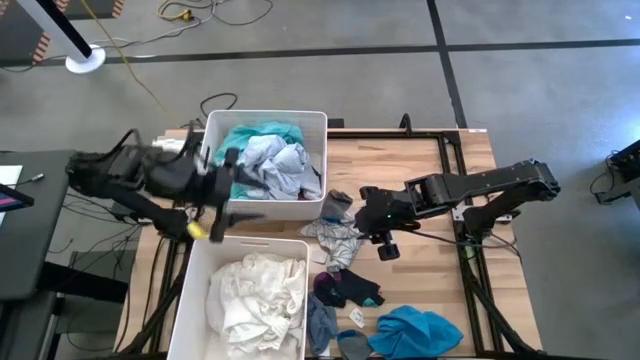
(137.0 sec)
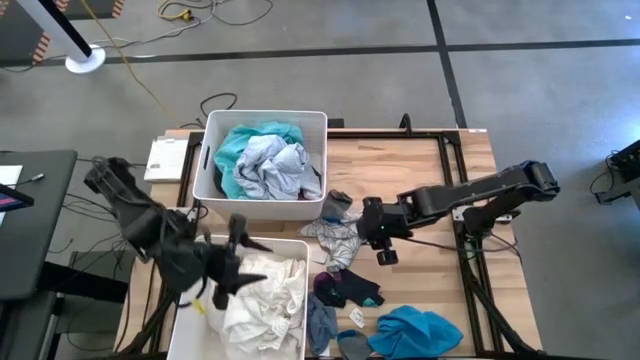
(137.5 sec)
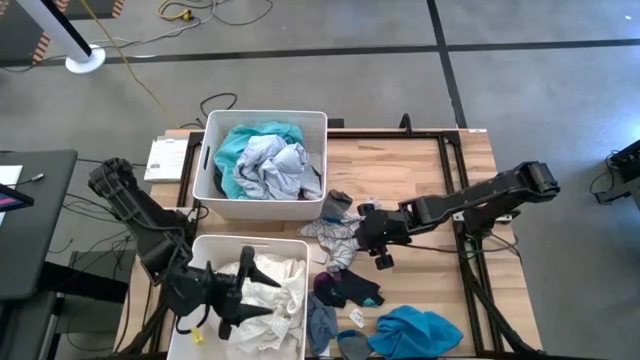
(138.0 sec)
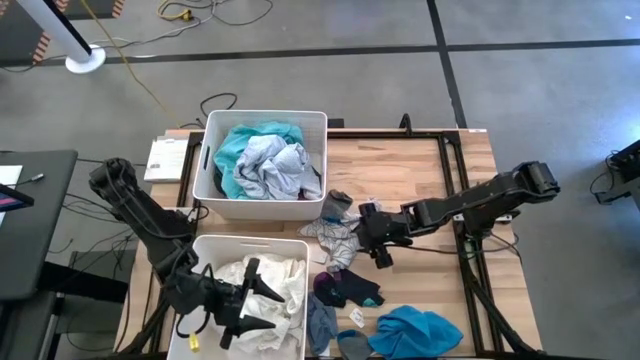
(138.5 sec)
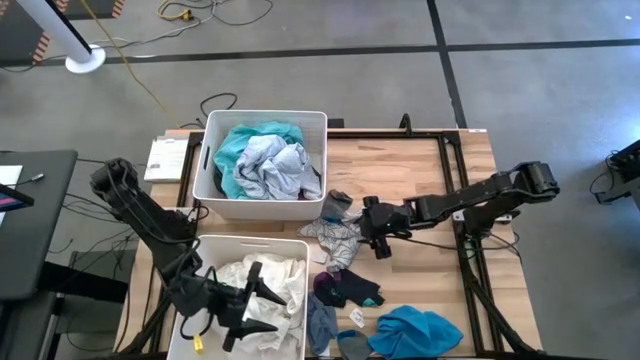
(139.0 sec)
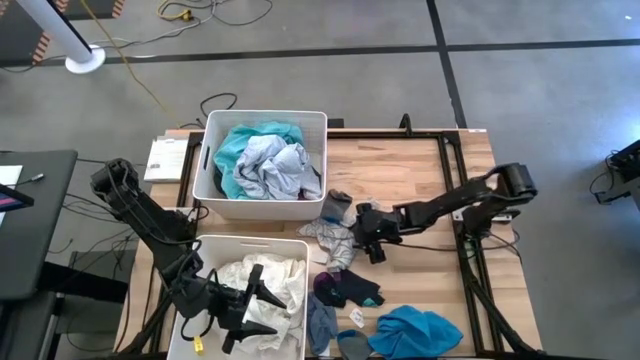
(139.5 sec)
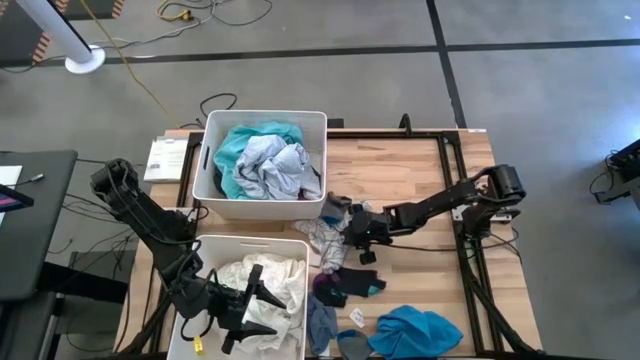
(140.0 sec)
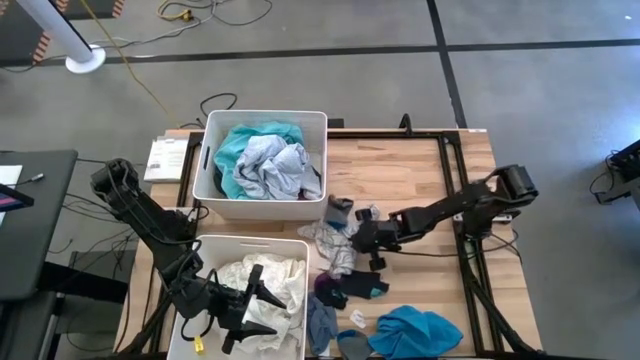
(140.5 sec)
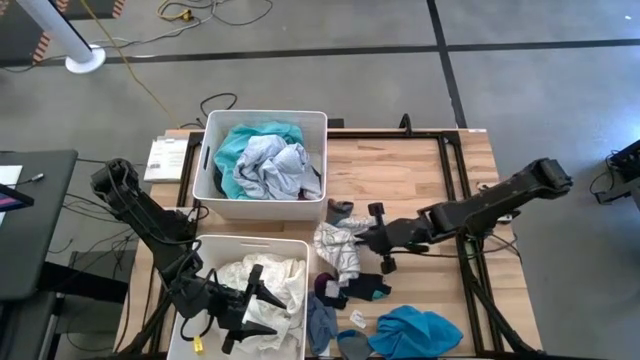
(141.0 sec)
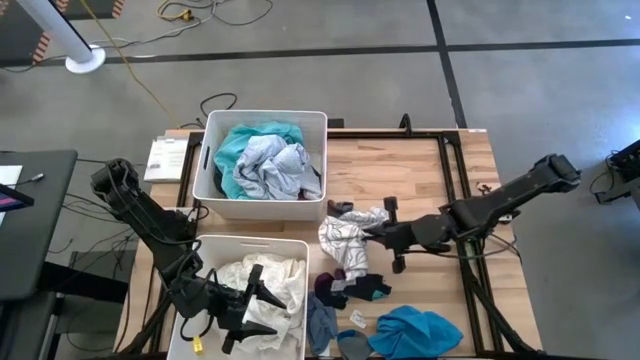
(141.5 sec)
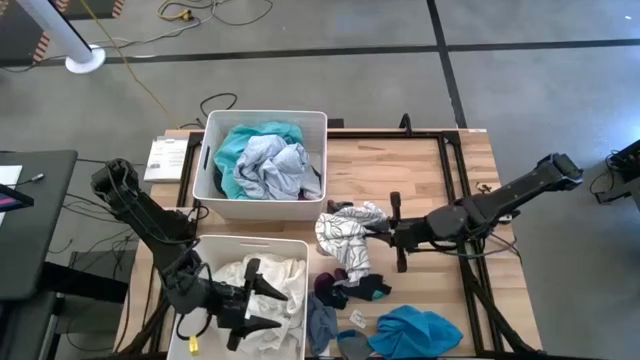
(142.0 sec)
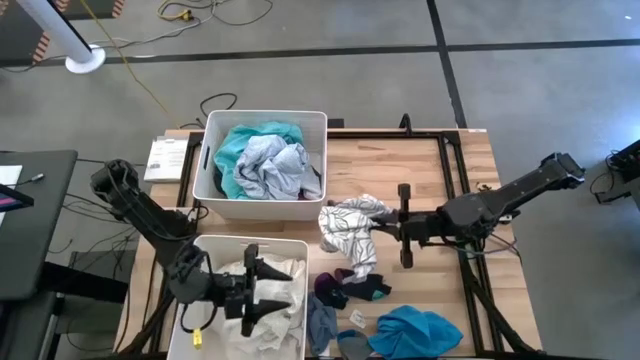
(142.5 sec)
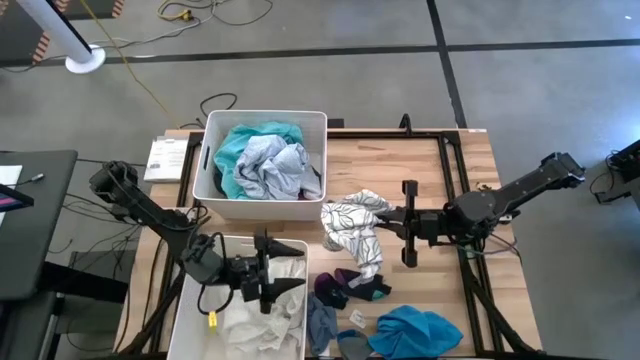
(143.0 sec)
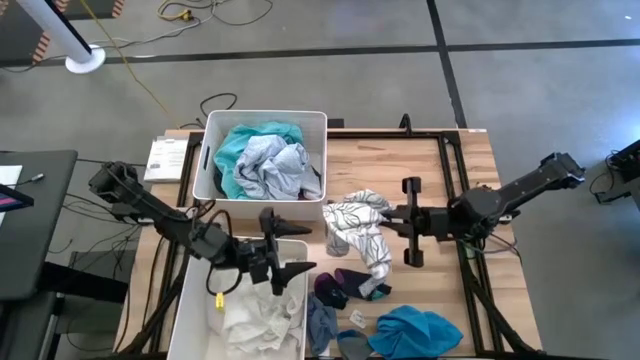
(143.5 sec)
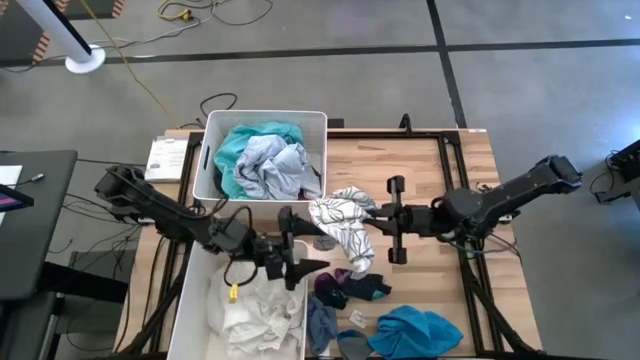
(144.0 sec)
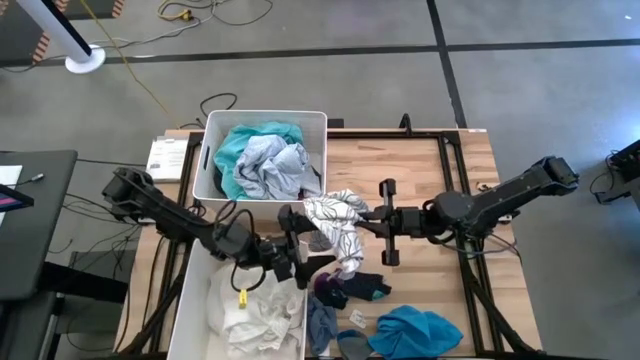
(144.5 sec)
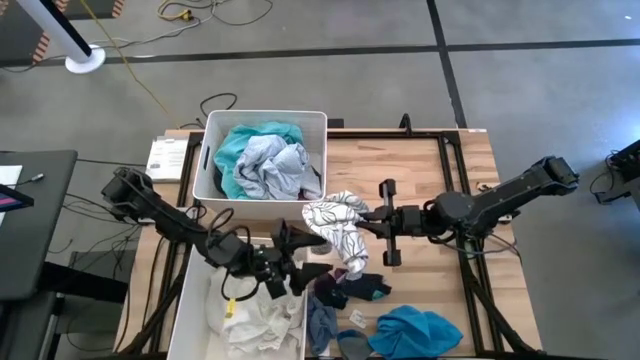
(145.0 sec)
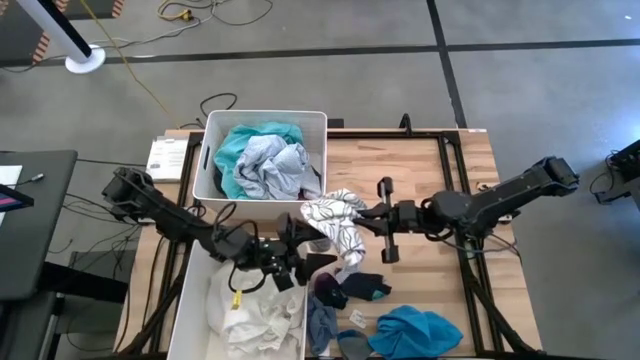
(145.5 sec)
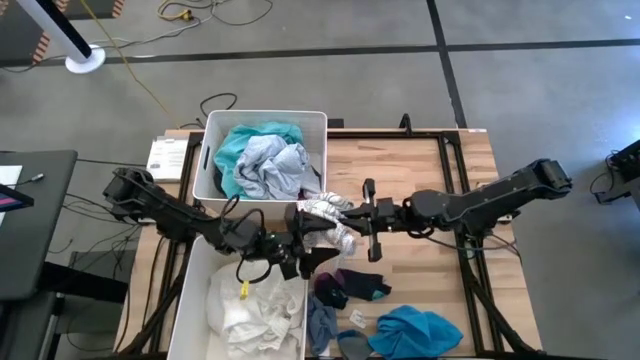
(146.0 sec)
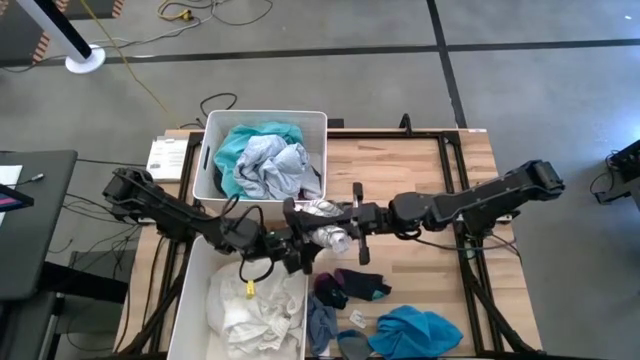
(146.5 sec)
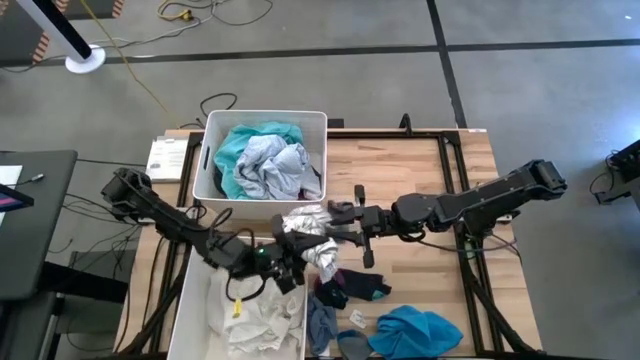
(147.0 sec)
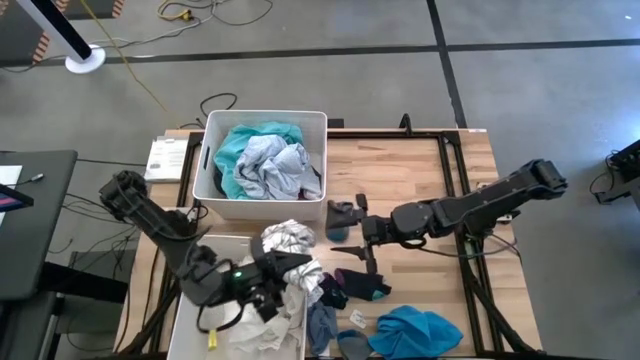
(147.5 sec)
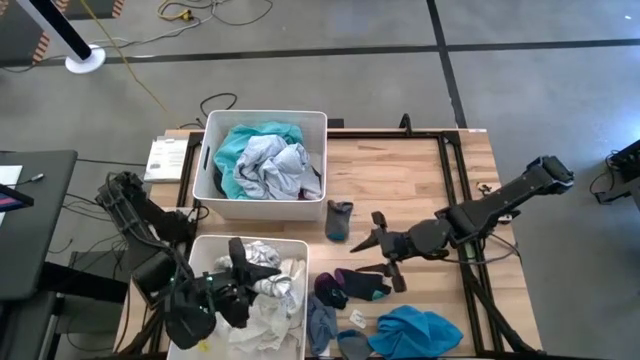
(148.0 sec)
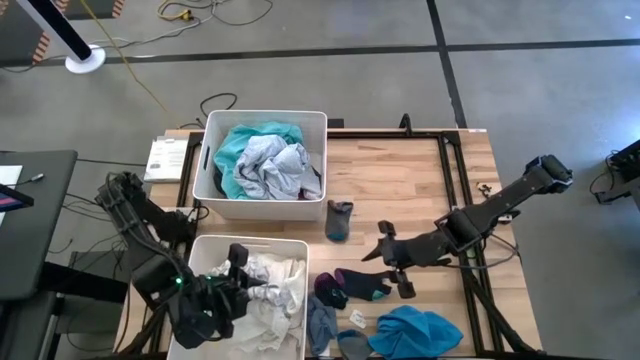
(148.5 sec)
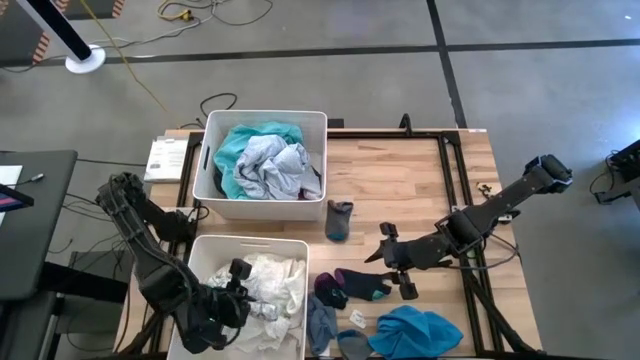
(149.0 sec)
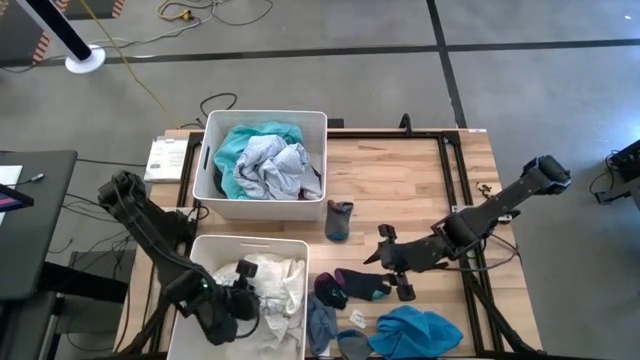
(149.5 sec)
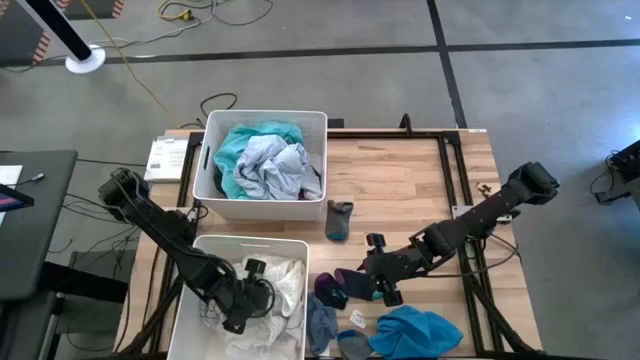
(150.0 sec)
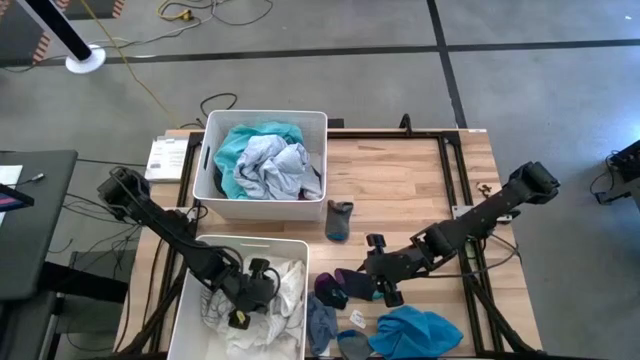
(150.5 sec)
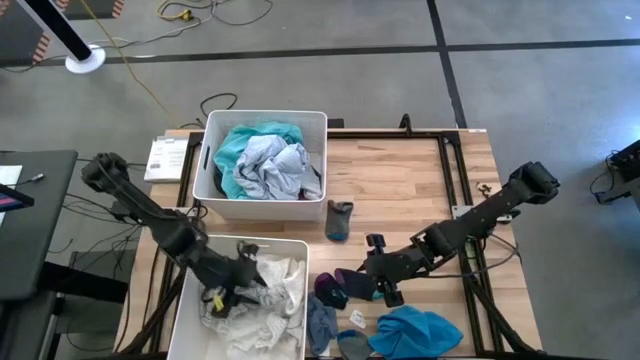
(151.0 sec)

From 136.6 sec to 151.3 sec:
Task: Sort clothes
Put the black patterned blouse into the bottom white laundry bin

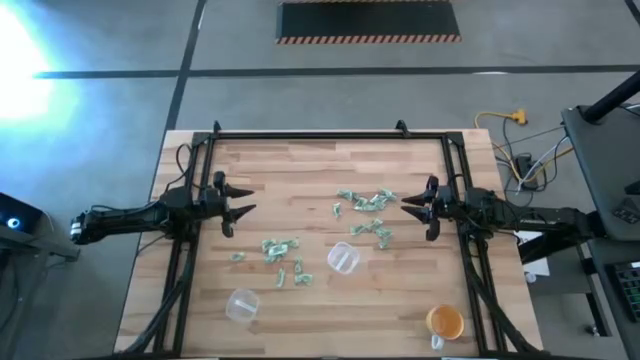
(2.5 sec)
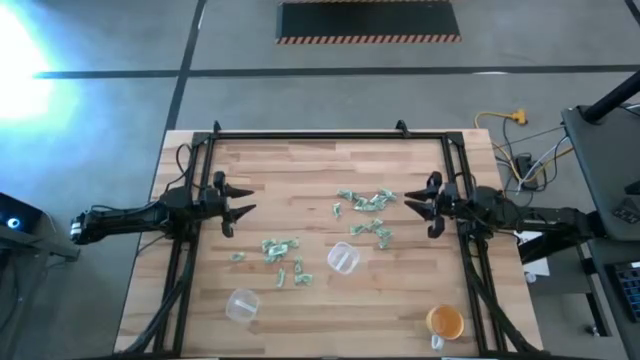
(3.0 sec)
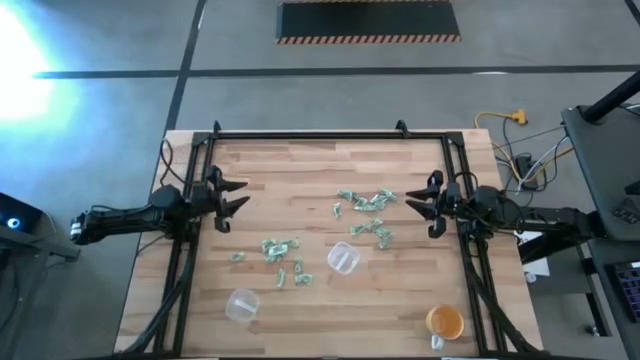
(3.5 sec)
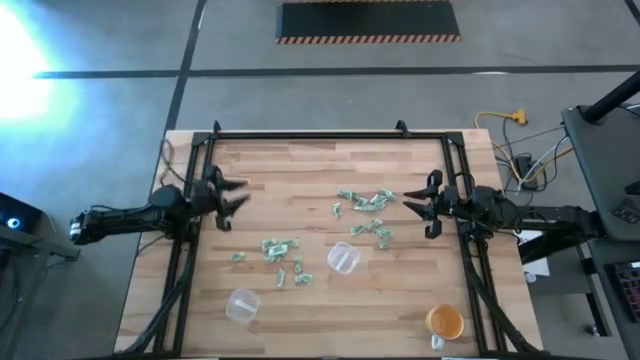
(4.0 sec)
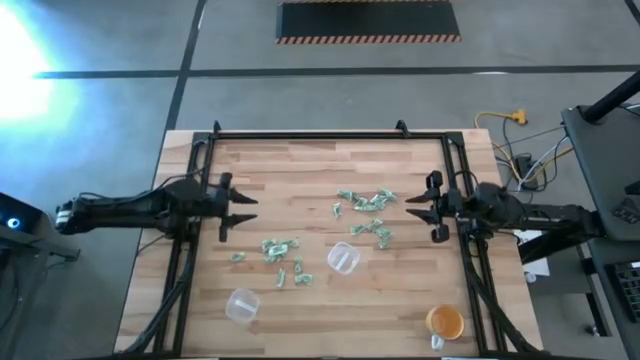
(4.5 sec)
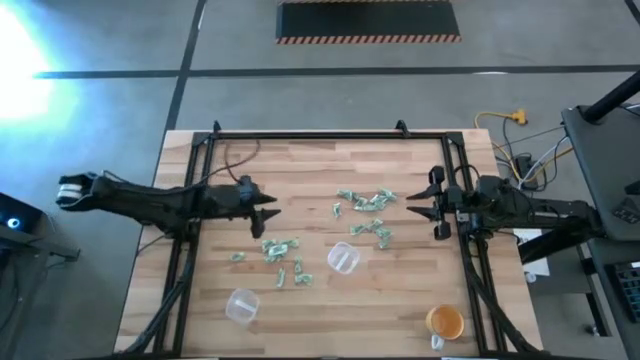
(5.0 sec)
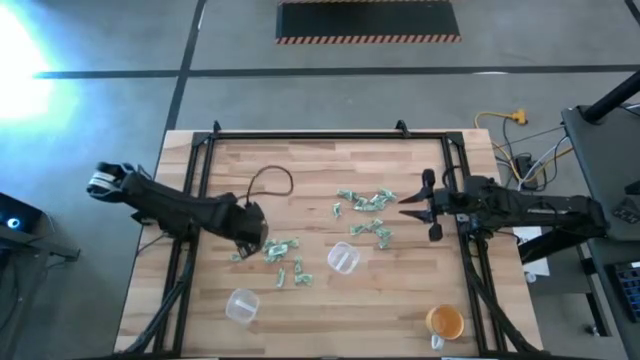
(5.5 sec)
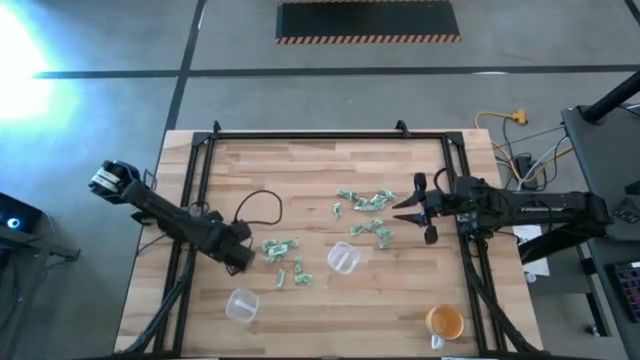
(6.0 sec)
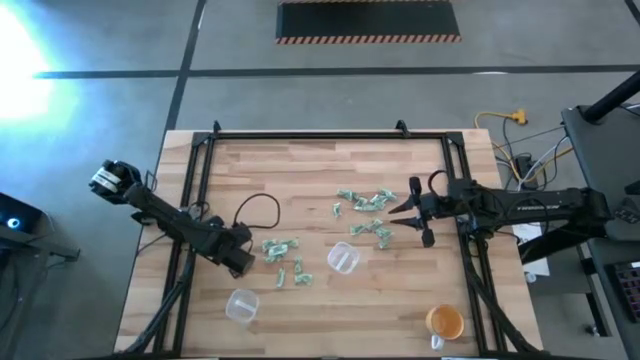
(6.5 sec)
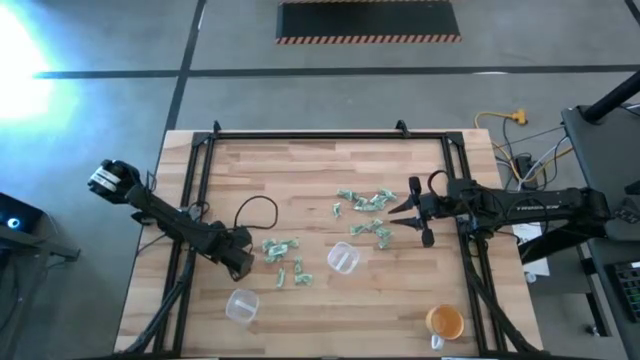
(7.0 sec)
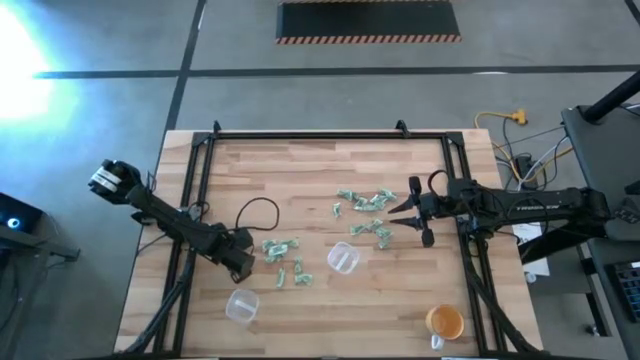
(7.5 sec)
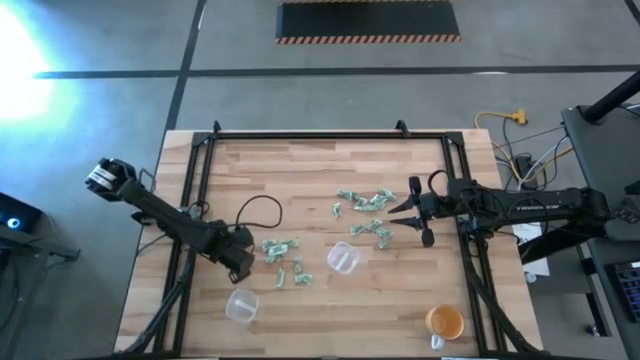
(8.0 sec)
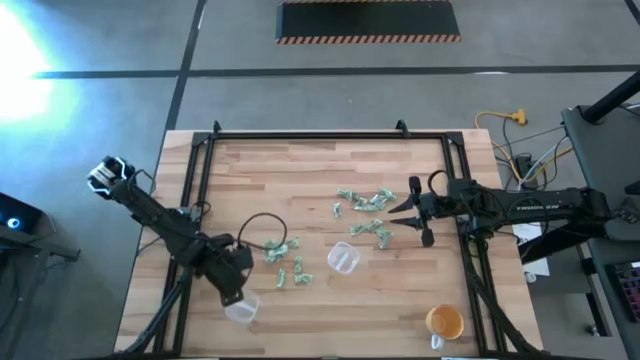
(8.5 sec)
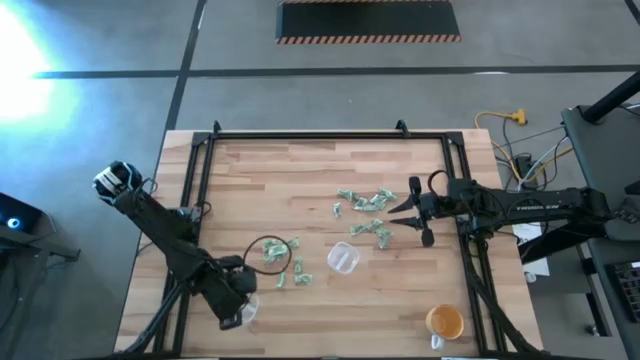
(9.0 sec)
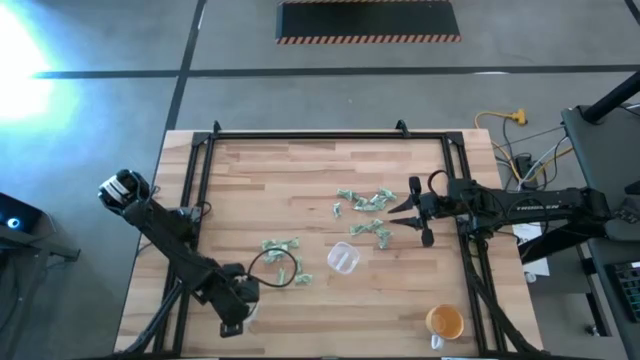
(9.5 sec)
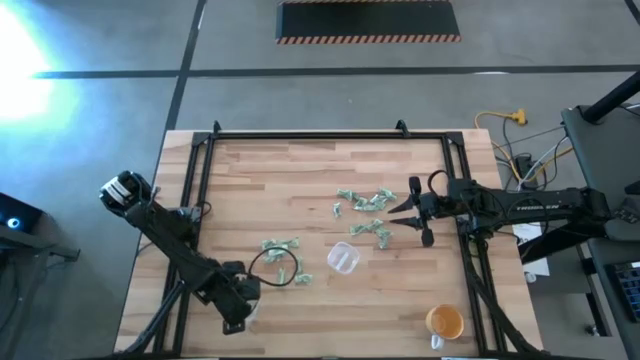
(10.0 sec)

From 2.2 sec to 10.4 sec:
Task: Pick and place items into bin
Put the light green packet into the bottom transparent bin
